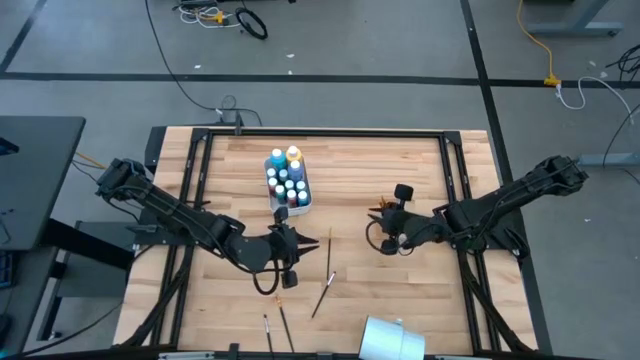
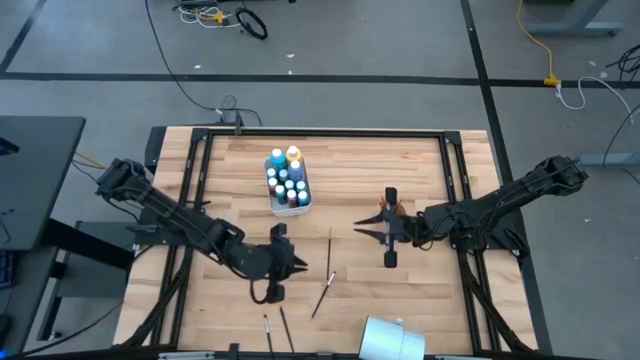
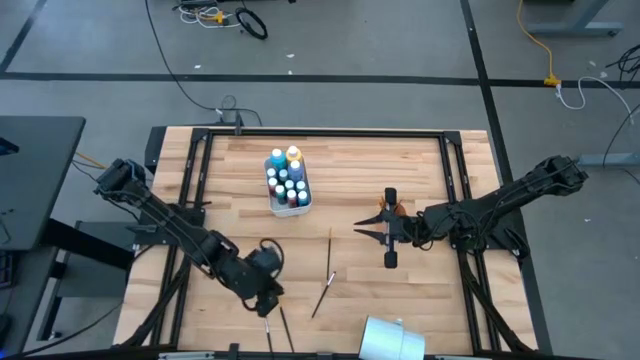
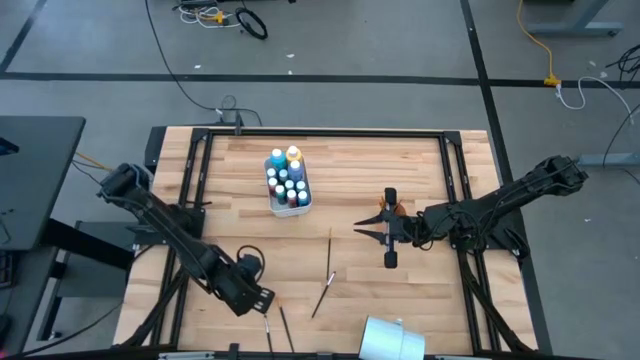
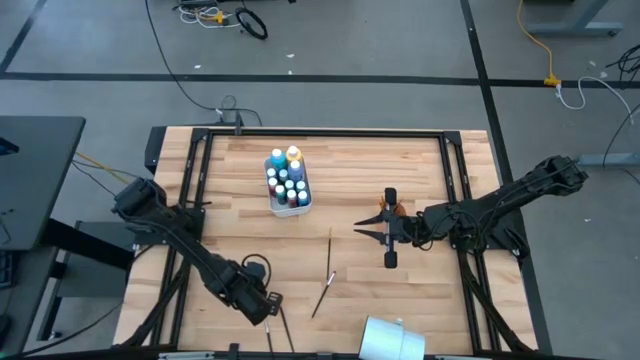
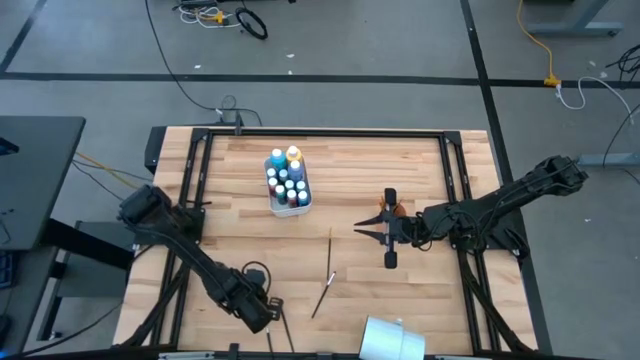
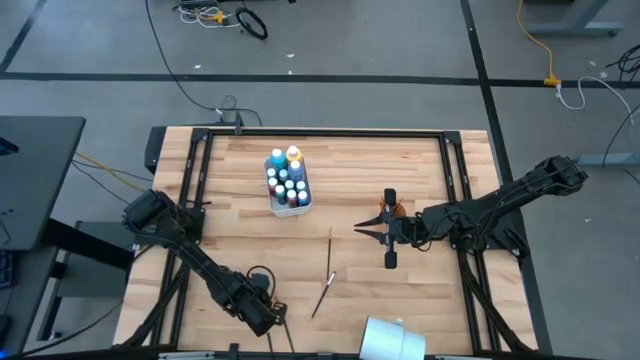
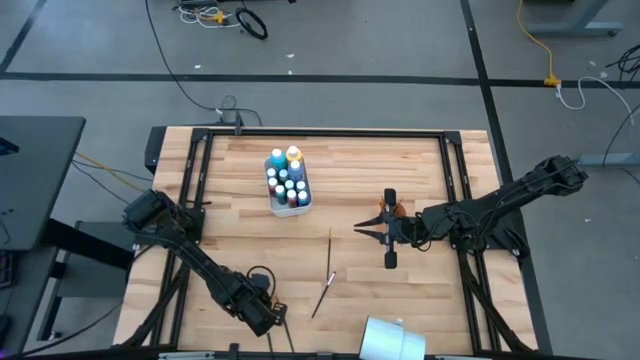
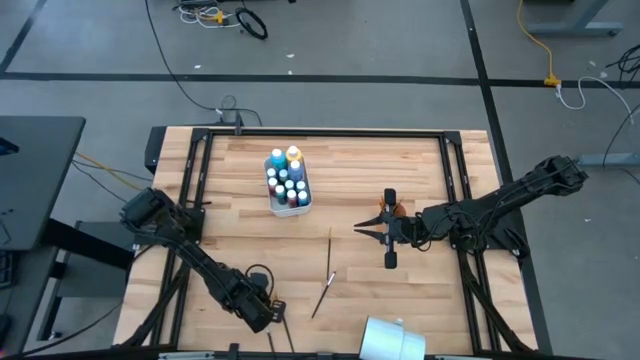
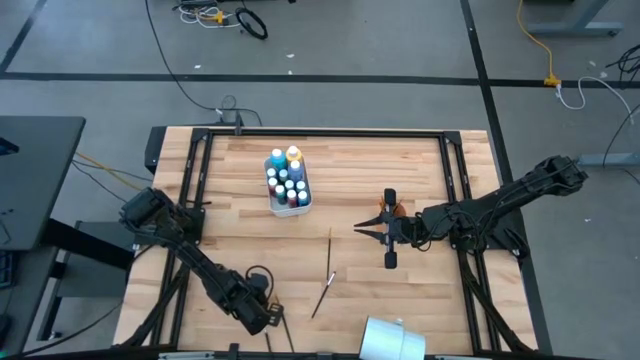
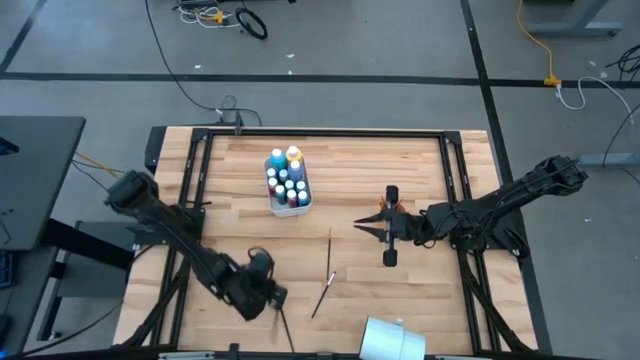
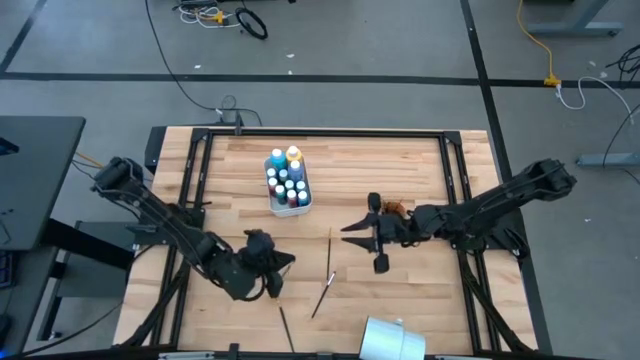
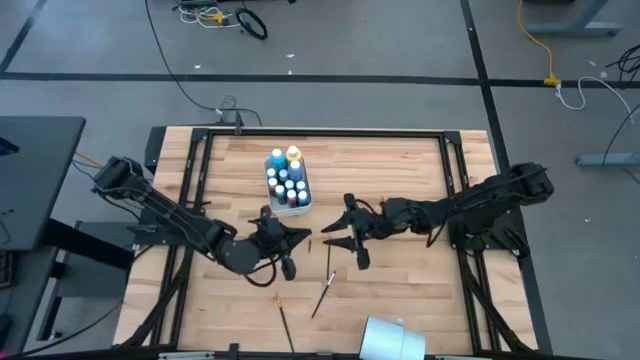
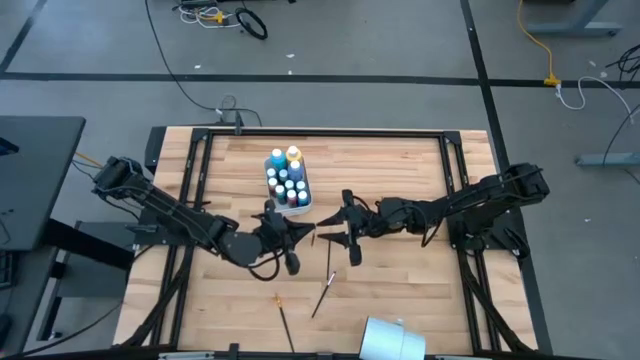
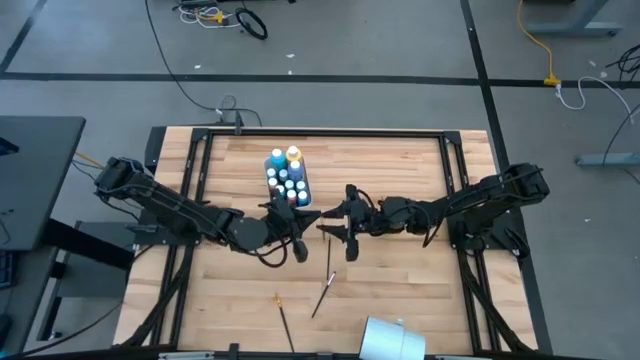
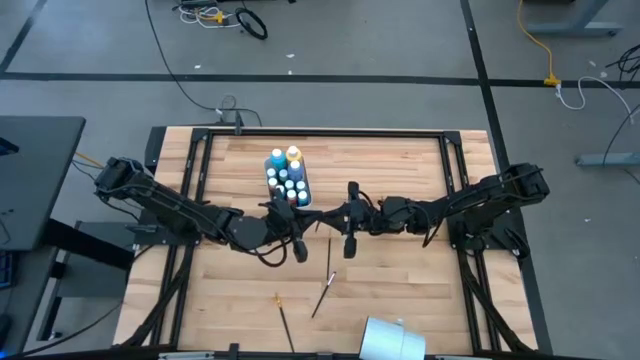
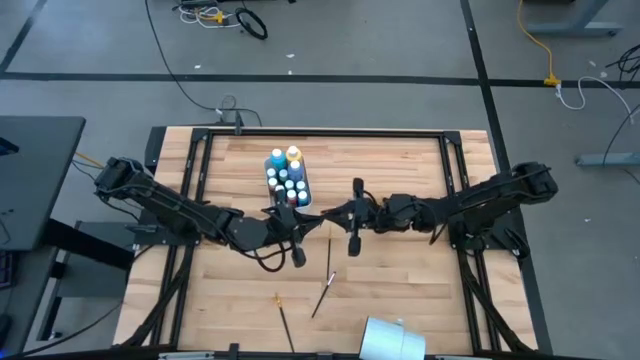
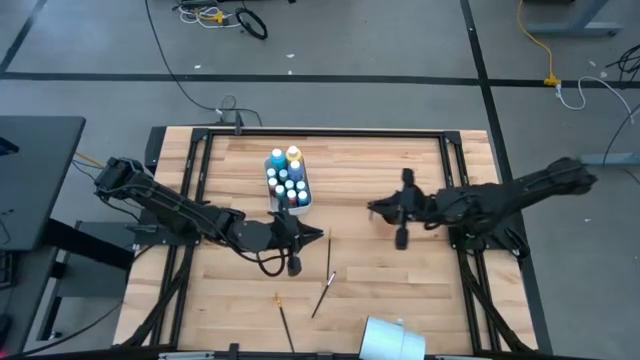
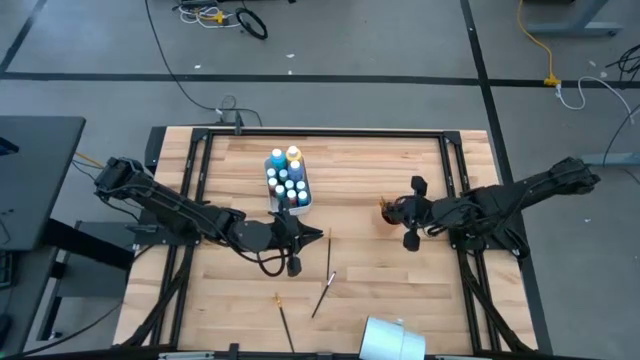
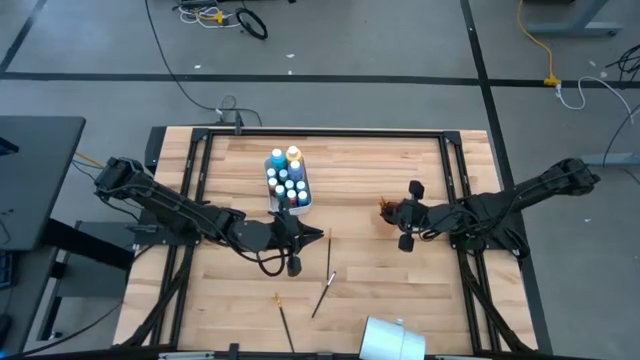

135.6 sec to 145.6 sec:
Task: Pick & Place Paint Supplies
Put the silver paint brush into the orange cup

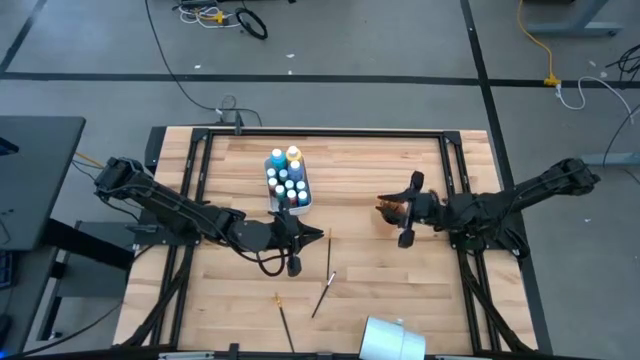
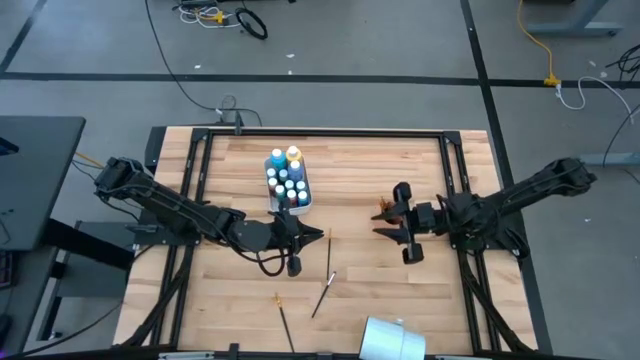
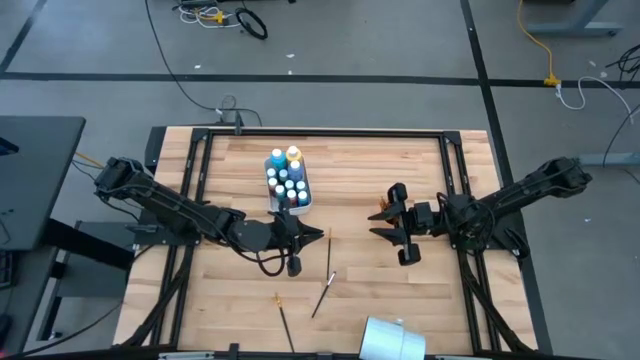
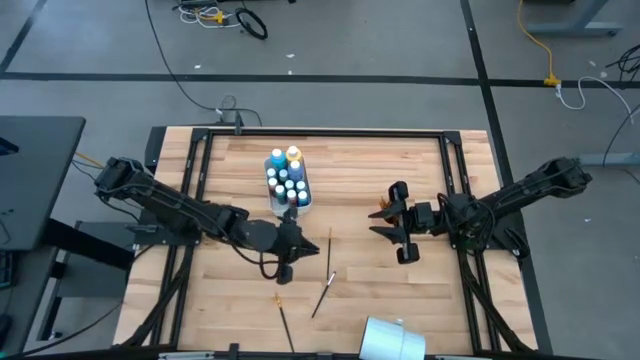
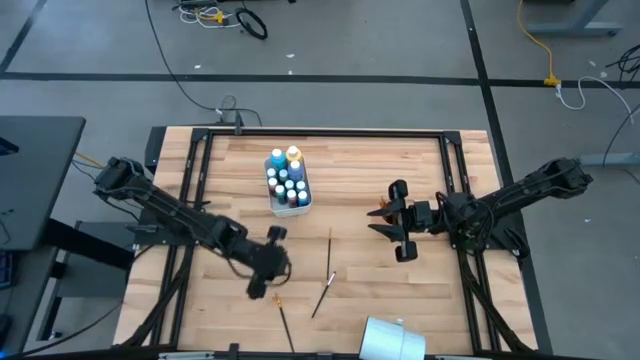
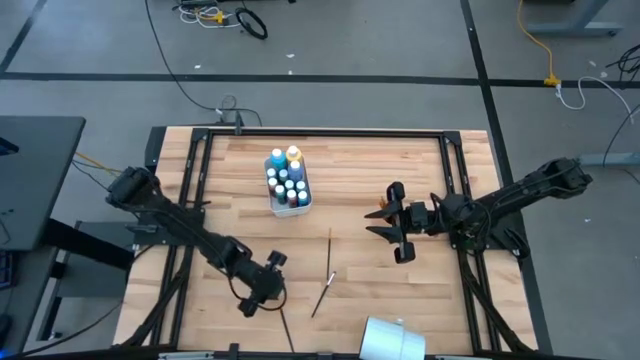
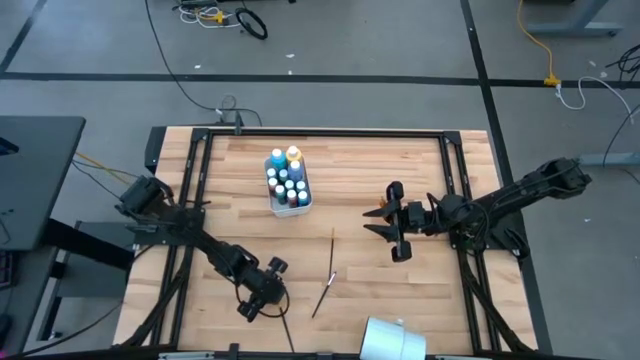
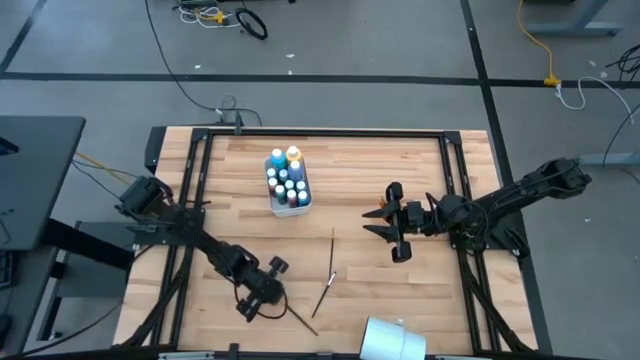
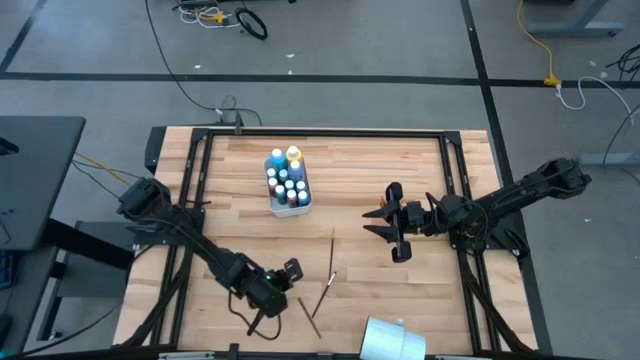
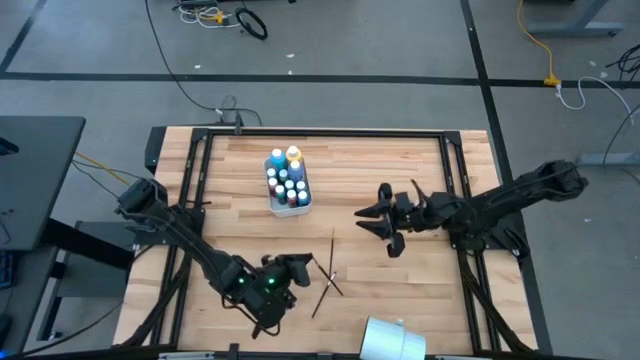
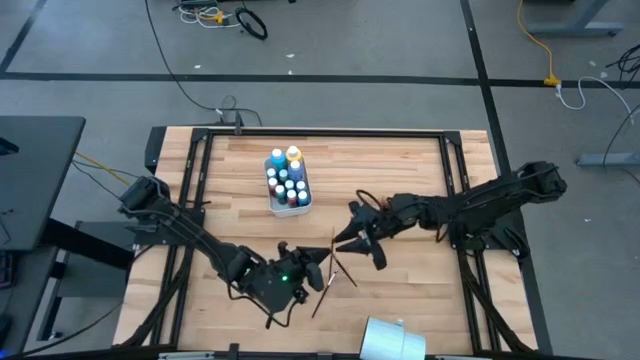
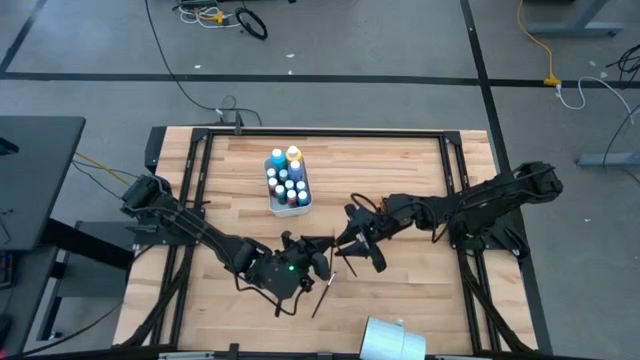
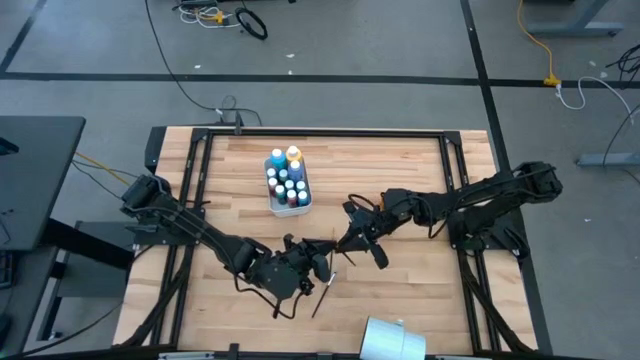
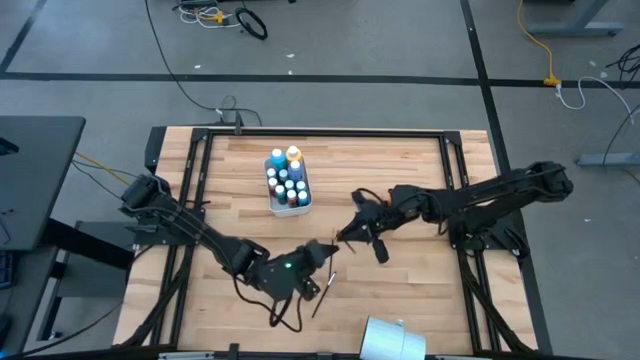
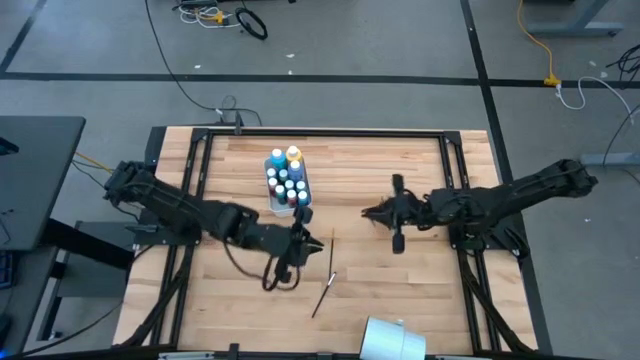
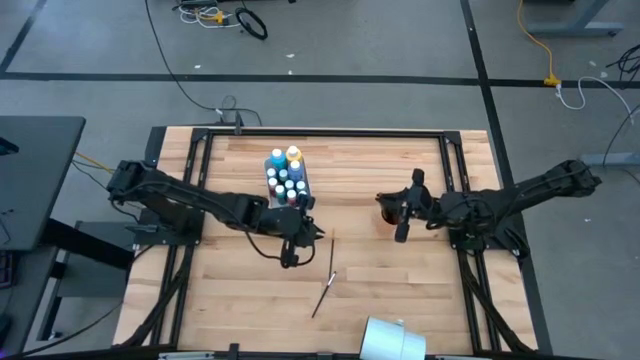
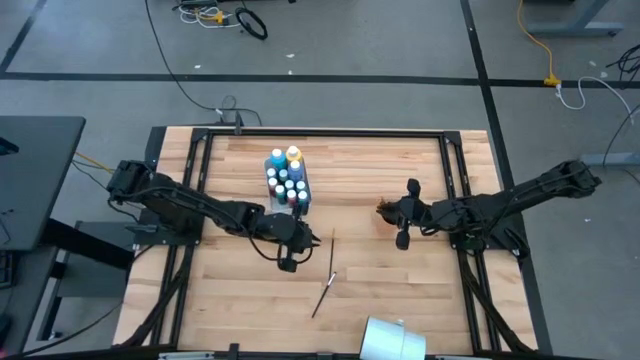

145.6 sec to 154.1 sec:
Put the gold paint brush into the orange cup

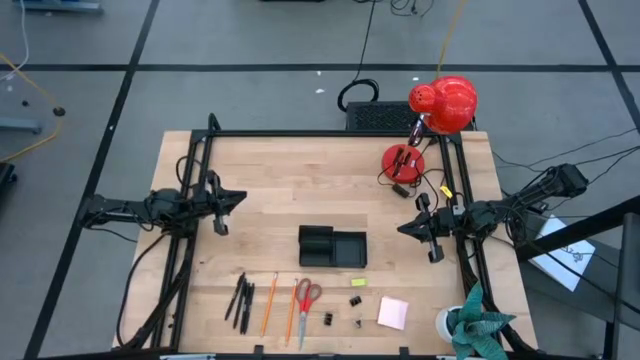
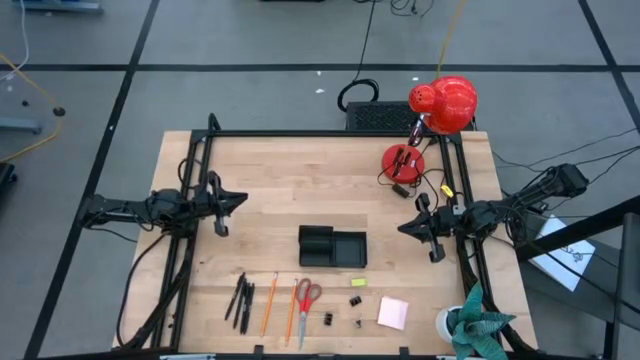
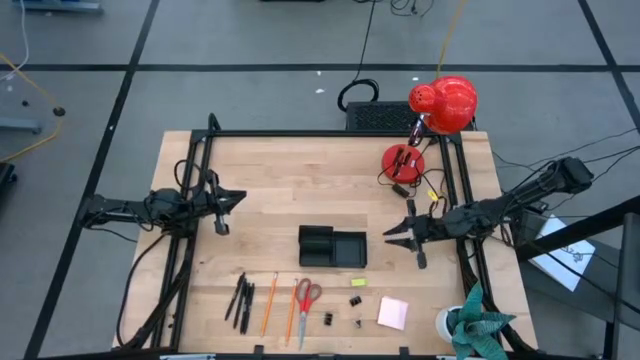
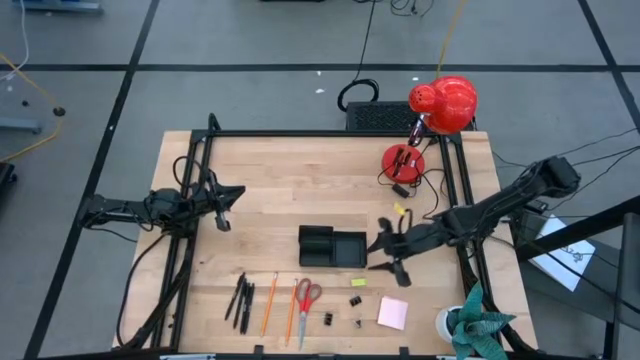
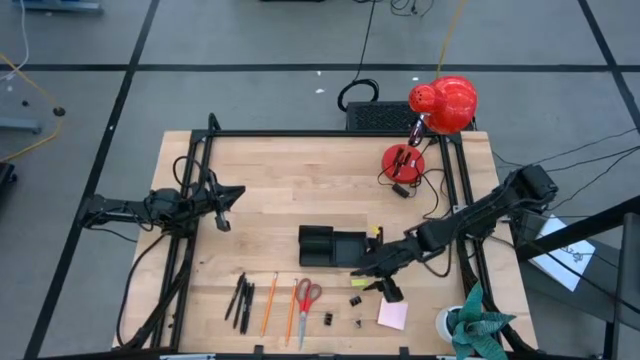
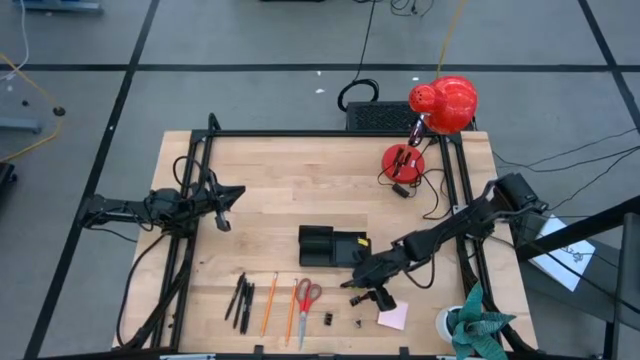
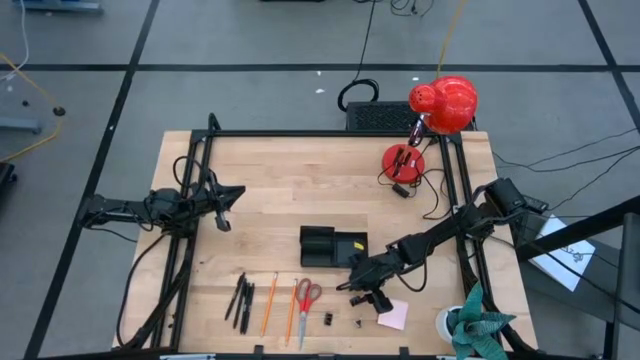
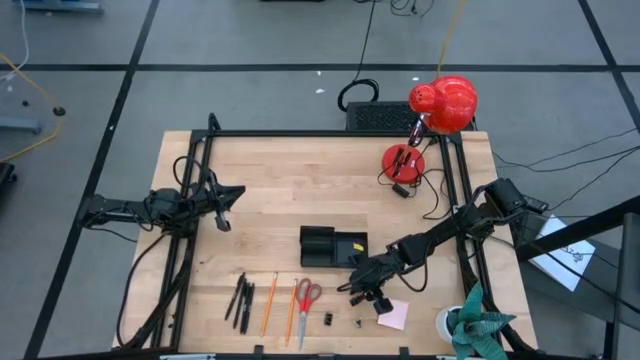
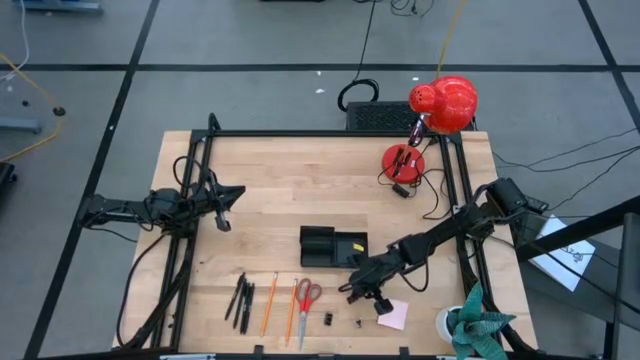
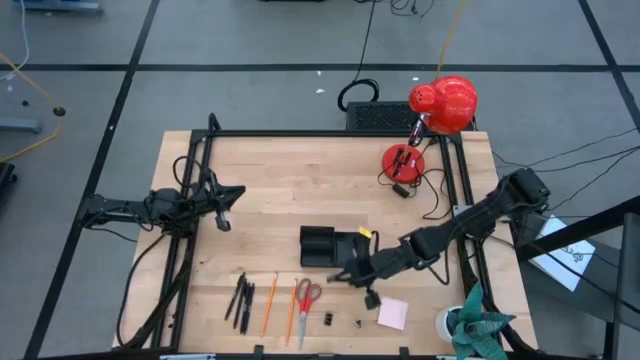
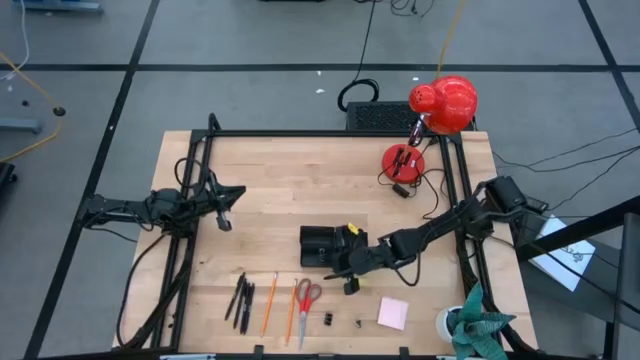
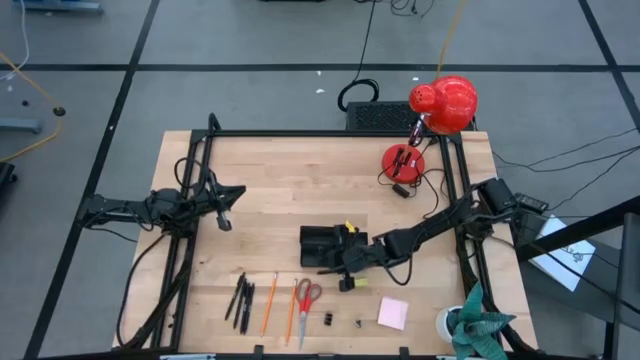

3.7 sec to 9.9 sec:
Task: Pick and place office supplies into organizer
Put the black binder clip into the black desk organizer
